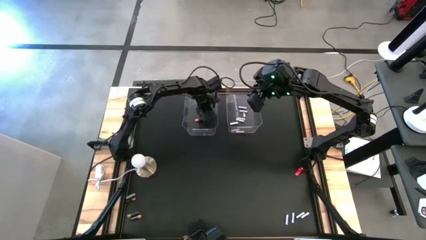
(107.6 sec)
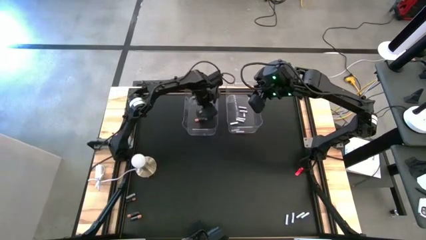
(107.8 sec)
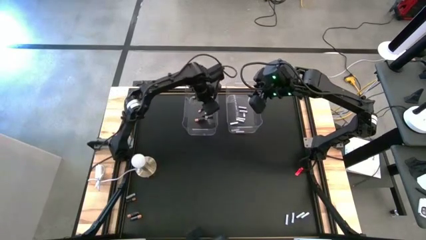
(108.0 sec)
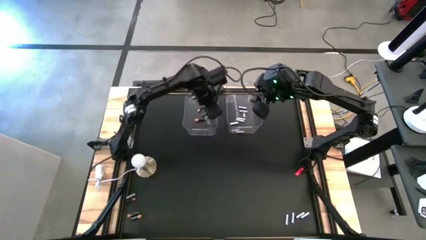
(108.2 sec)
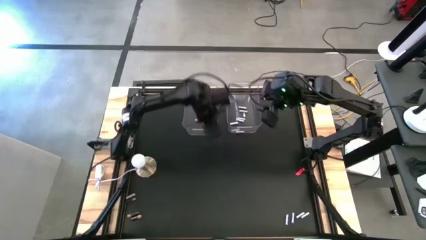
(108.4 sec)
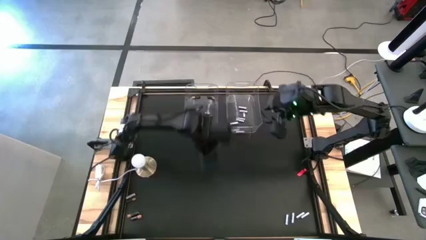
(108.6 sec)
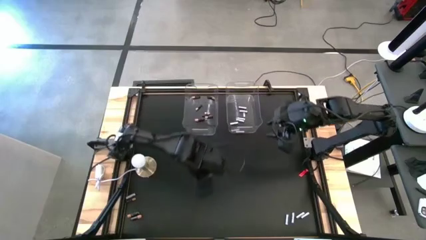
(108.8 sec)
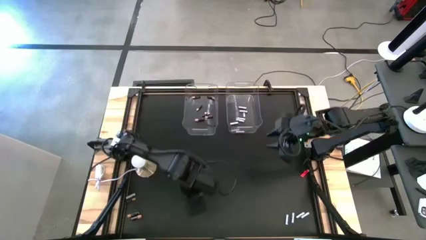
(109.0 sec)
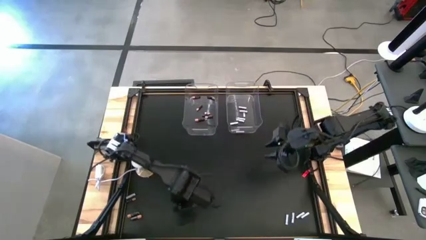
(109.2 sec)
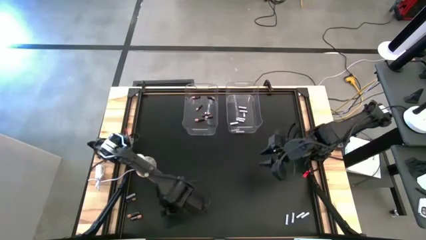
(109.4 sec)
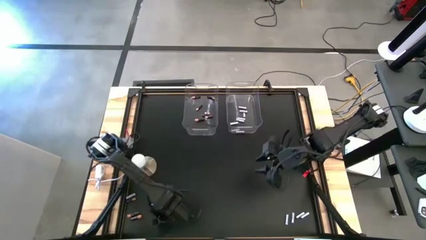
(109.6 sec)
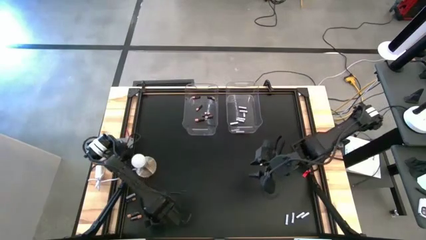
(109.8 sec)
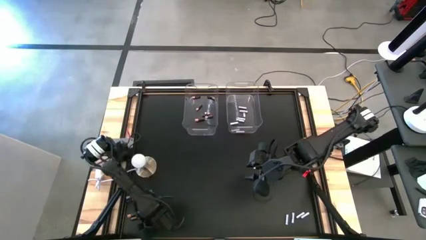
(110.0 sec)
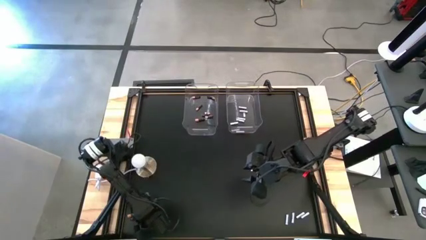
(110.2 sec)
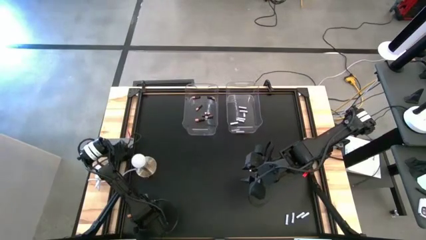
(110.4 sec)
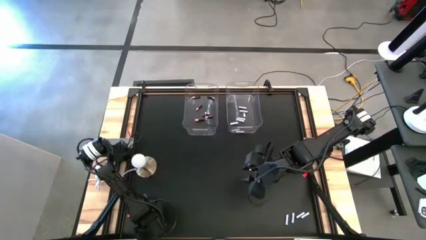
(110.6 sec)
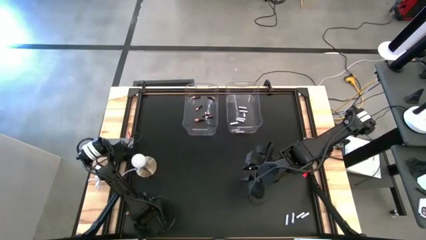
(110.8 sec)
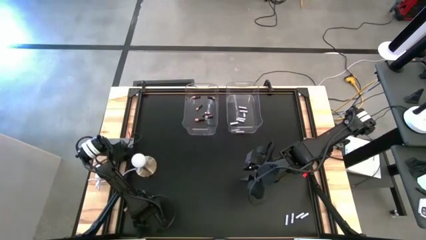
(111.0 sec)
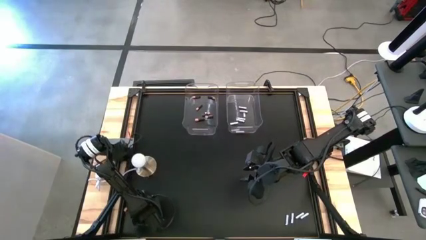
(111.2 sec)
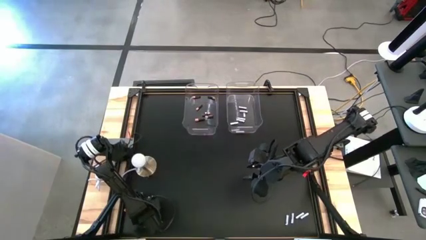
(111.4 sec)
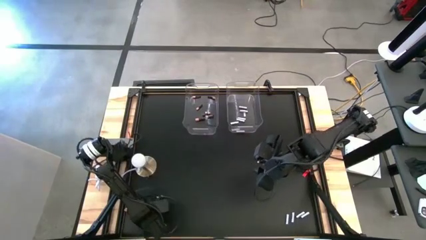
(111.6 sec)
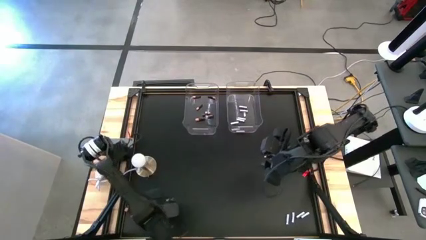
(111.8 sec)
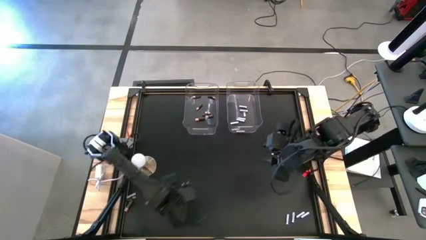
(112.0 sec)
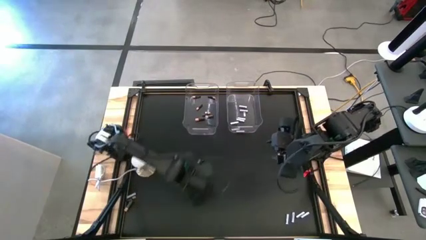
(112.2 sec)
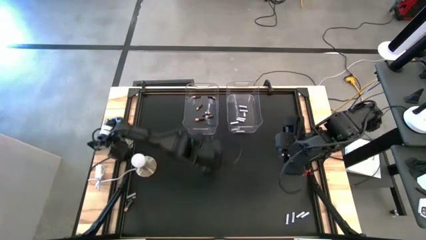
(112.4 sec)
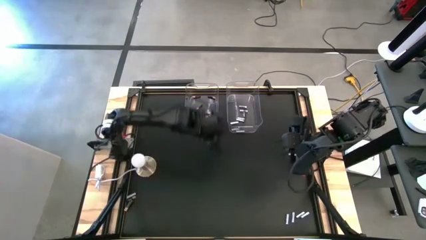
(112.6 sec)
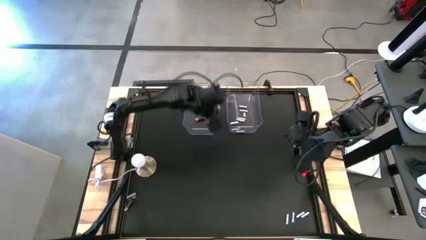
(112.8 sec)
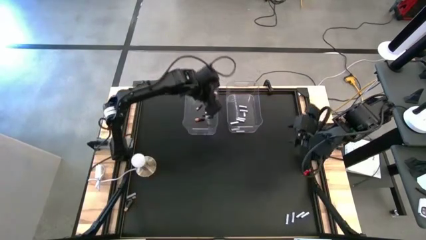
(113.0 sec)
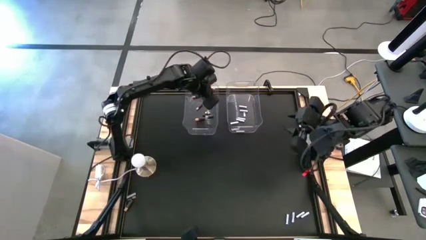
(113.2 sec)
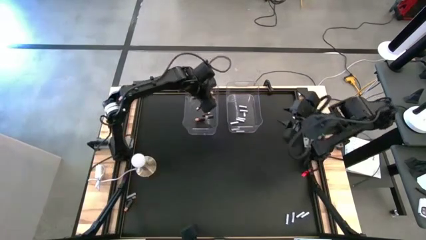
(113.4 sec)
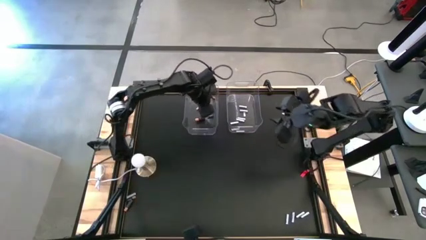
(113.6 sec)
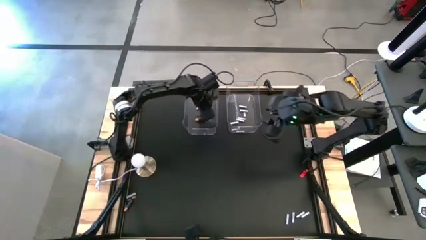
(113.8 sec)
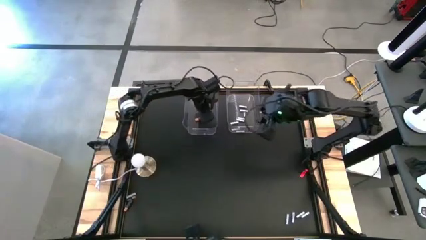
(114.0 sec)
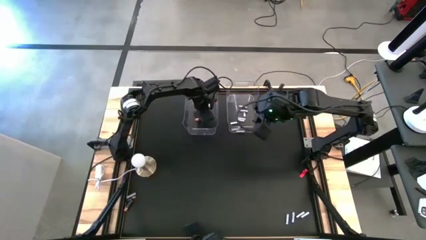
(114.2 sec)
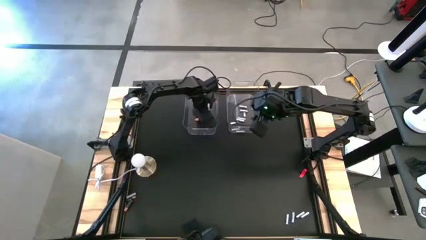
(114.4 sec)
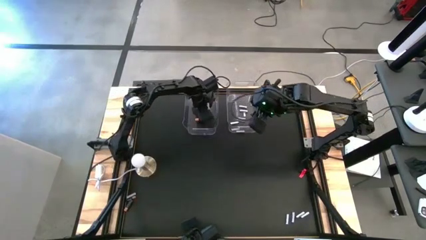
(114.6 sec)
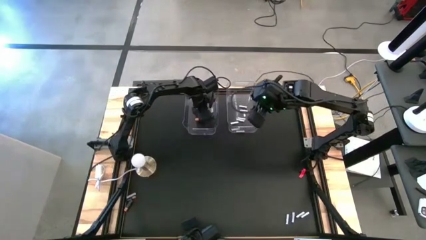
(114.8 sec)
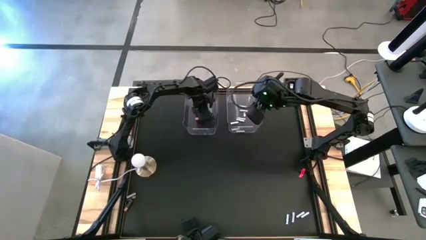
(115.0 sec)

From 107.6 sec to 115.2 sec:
Task: Sort batteries
Put the black battery into the left transparent bin

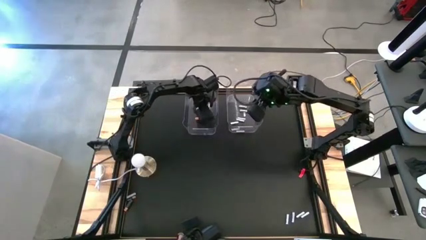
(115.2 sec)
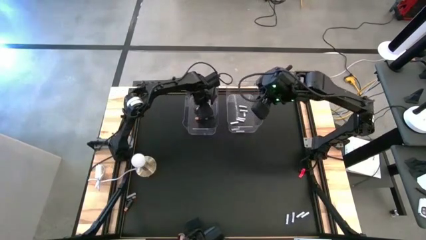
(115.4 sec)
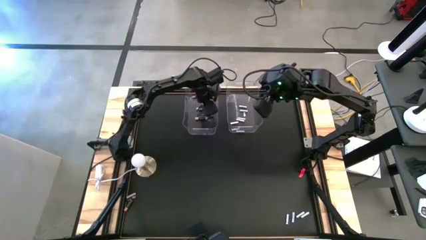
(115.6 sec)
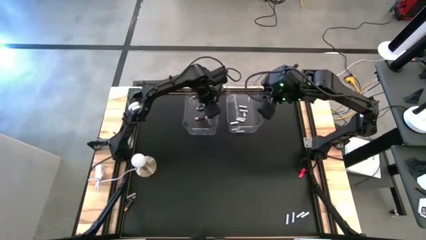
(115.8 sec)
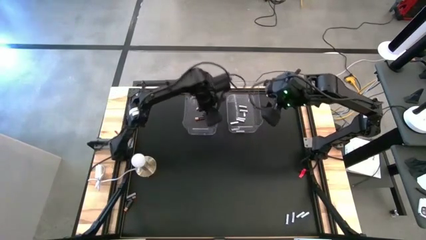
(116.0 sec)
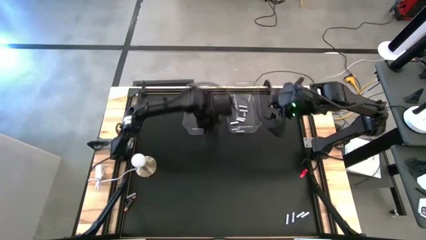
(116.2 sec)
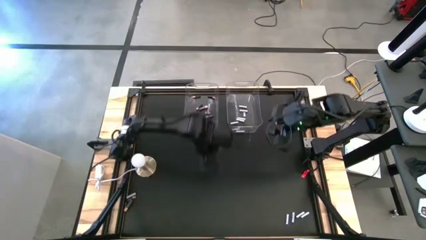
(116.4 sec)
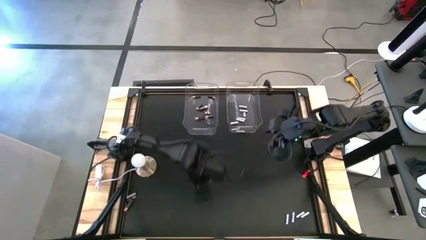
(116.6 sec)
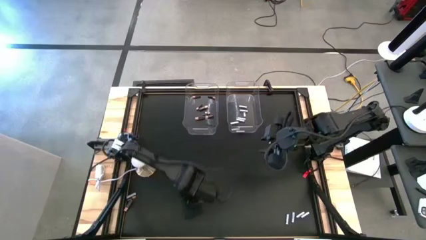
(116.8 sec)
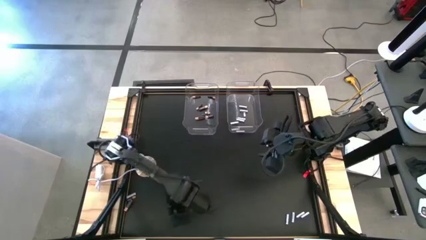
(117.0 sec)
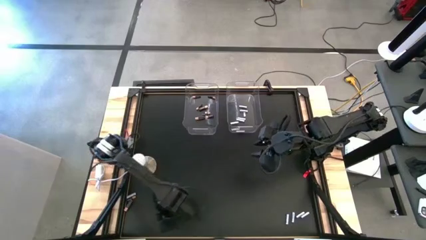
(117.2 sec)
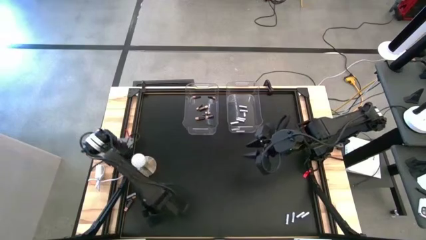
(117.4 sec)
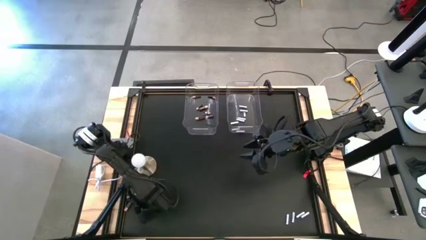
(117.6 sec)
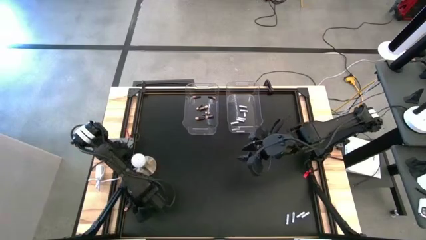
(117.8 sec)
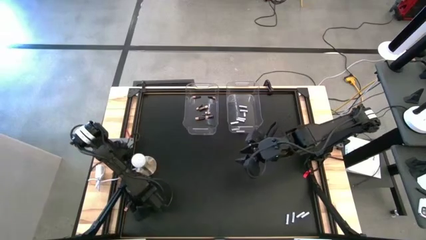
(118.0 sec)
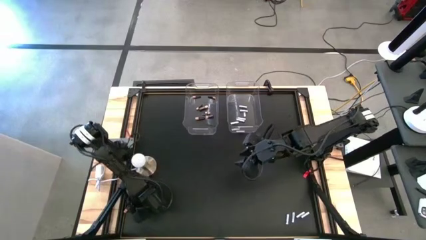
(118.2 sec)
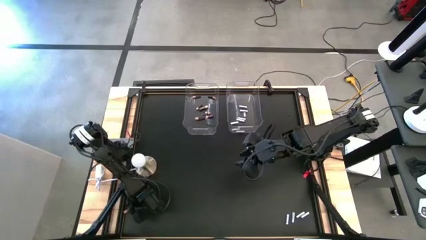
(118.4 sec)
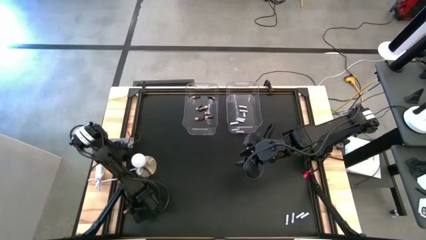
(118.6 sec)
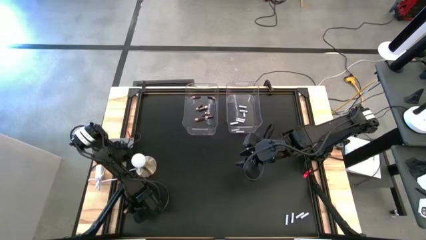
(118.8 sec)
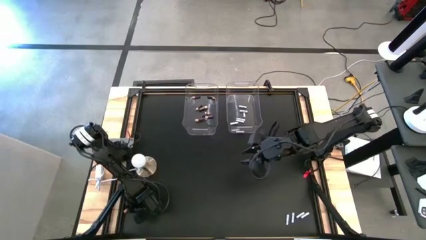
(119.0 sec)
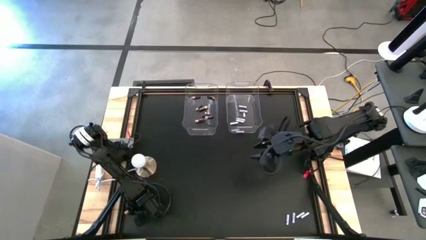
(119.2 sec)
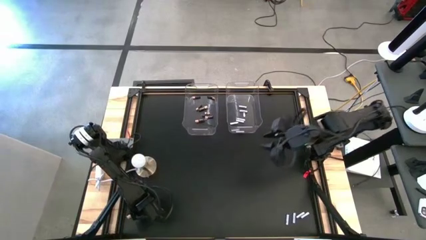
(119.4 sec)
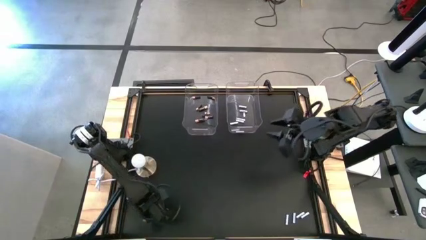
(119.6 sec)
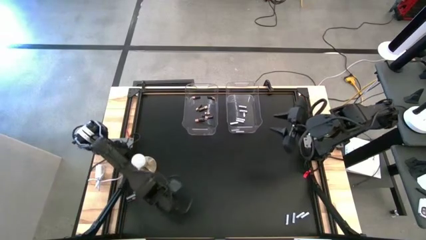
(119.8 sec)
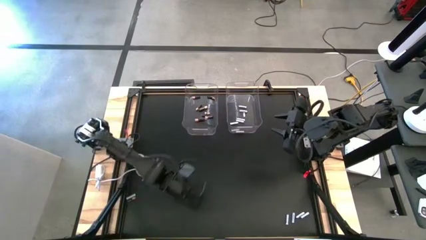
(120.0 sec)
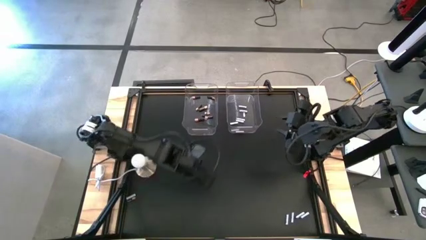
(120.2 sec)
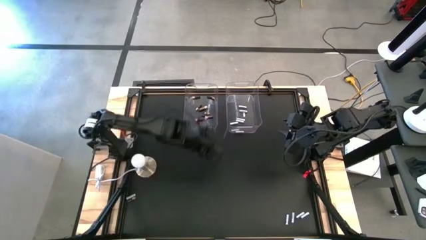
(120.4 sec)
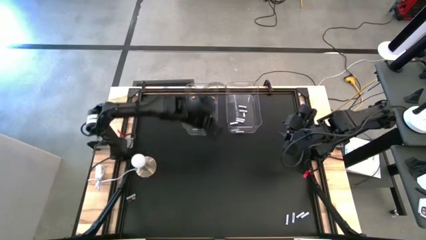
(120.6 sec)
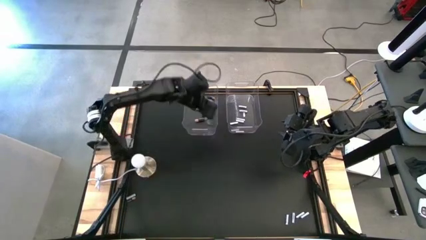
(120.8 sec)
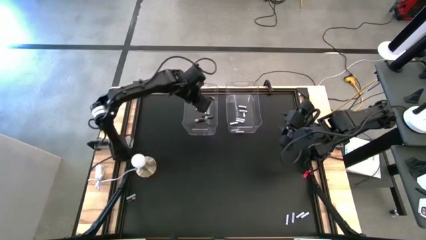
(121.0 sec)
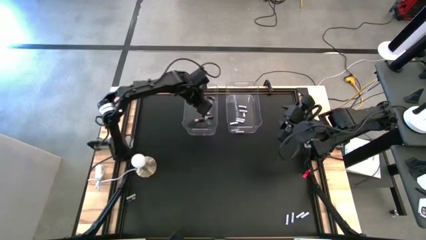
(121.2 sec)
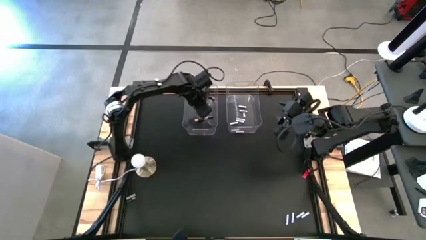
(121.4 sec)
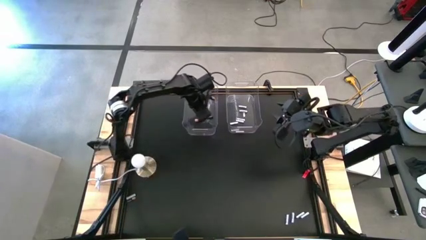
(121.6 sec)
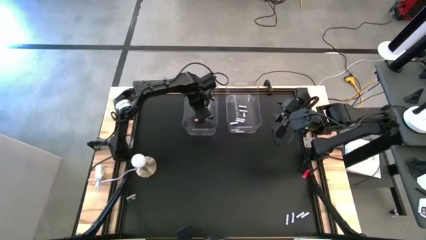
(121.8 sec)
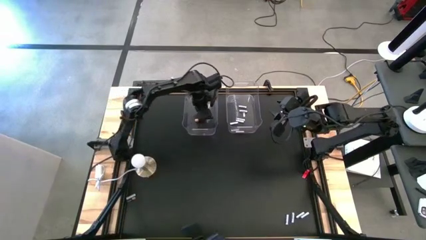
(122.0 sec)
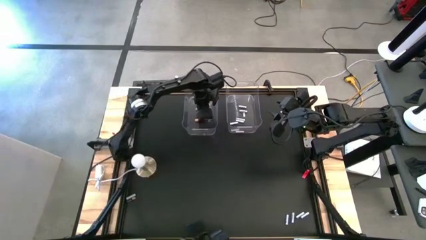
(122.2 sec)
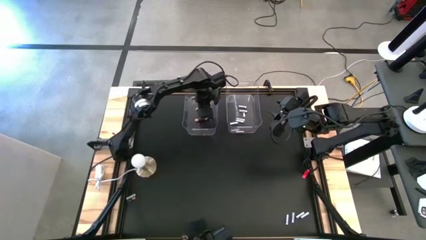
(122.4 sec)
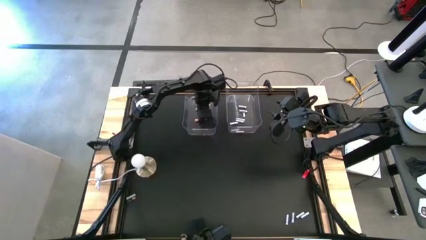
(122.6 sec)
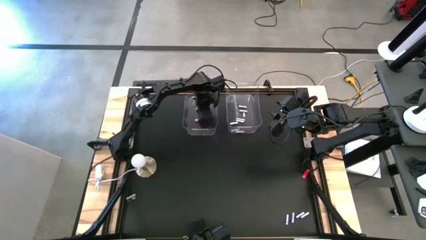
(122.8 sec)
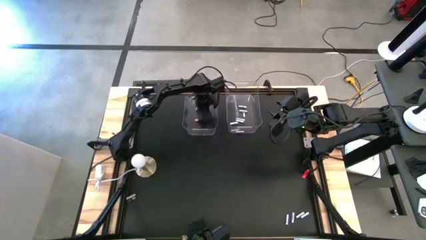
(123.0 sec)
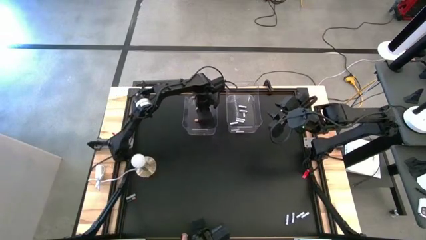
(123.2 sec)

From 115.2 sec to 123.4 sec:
Put the black battery into the left transparent bin
